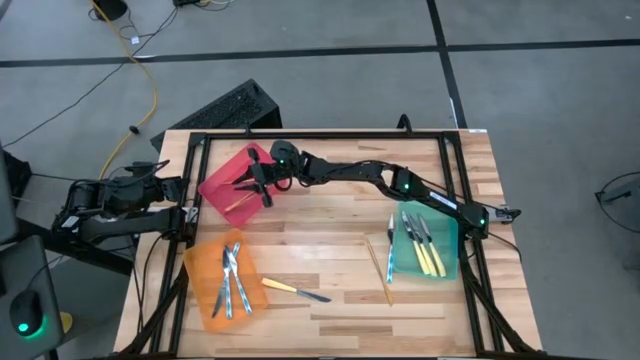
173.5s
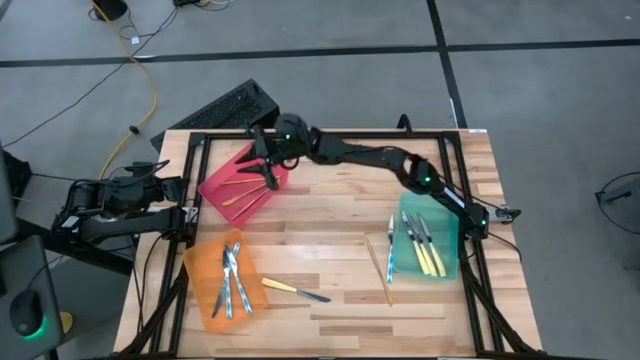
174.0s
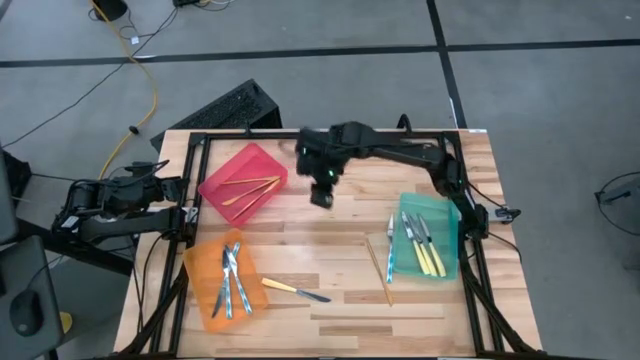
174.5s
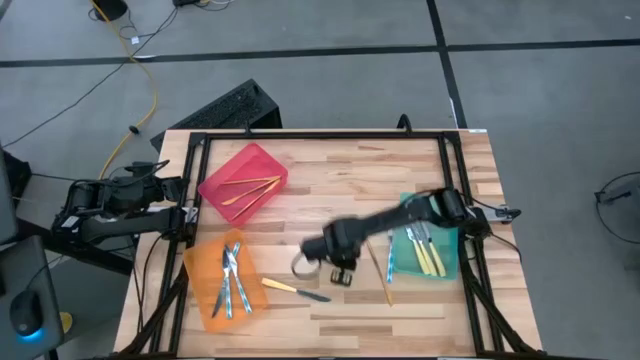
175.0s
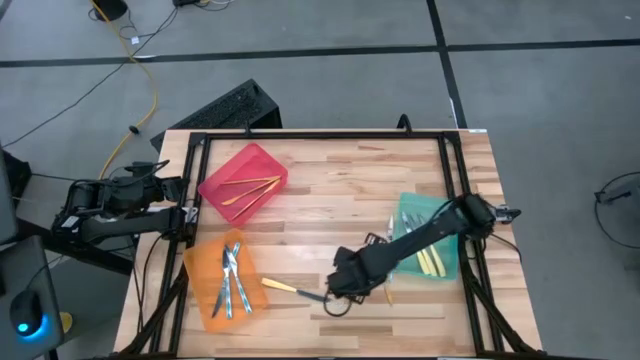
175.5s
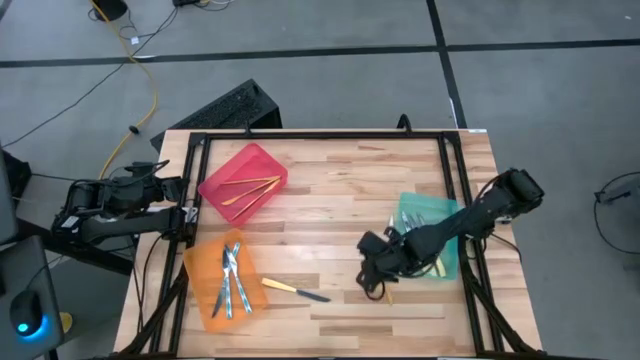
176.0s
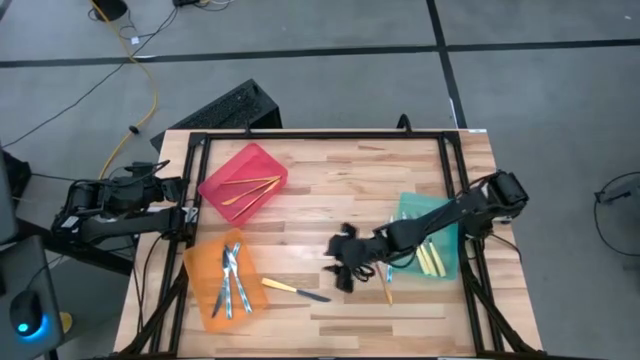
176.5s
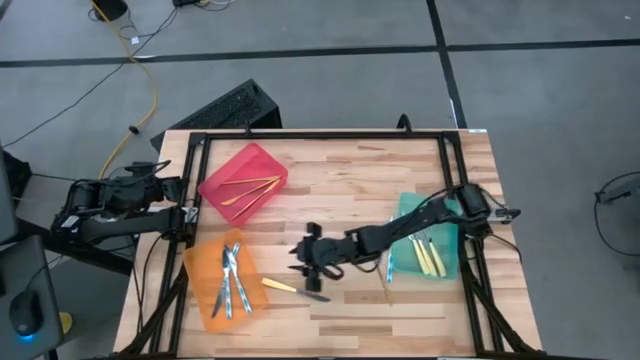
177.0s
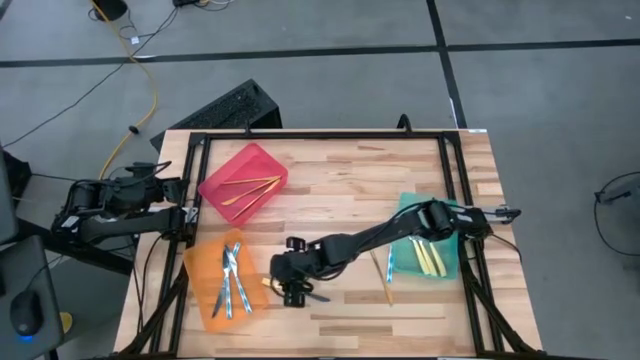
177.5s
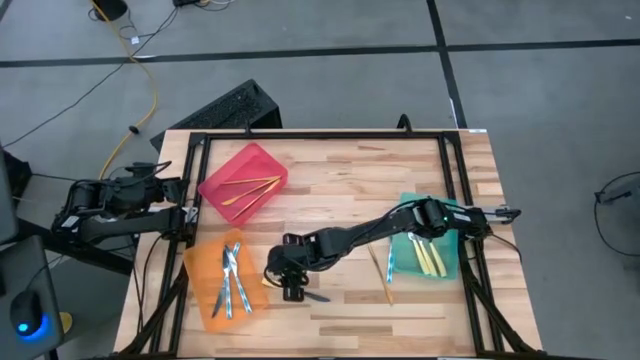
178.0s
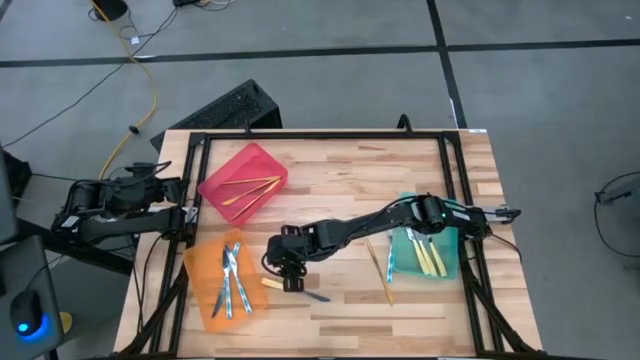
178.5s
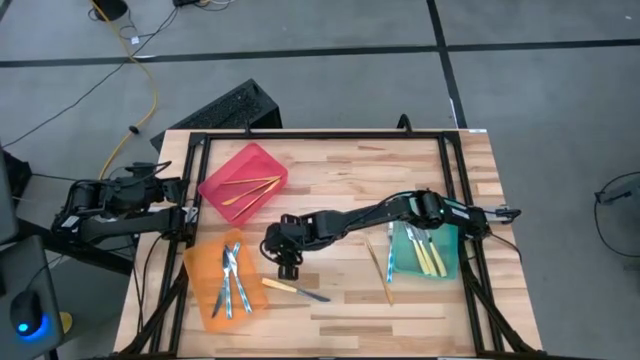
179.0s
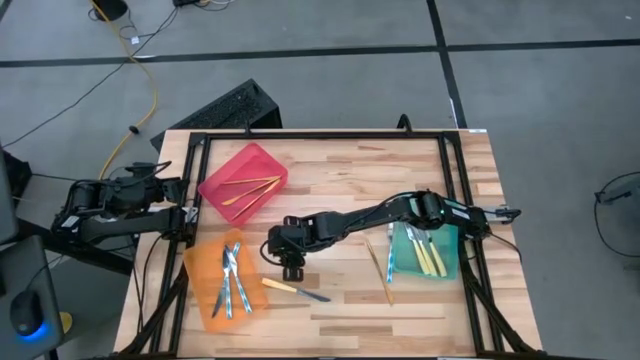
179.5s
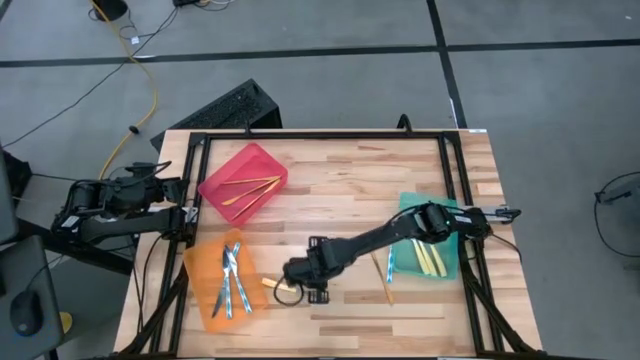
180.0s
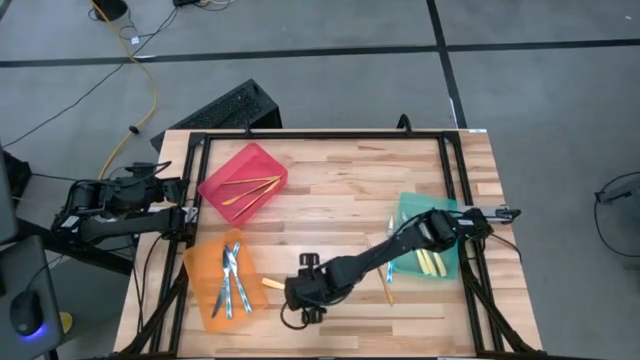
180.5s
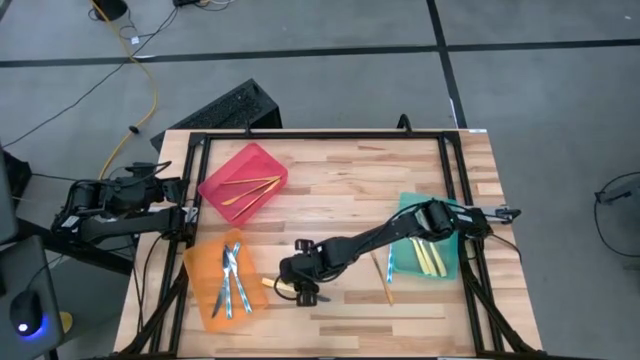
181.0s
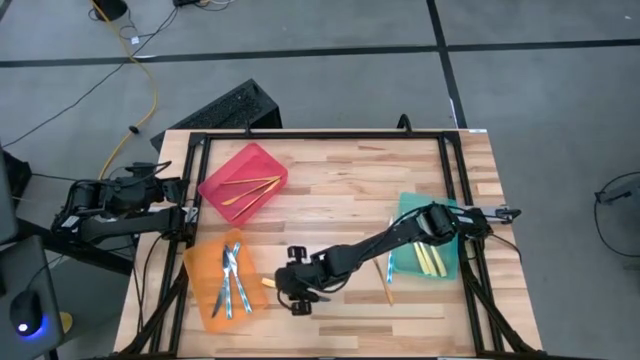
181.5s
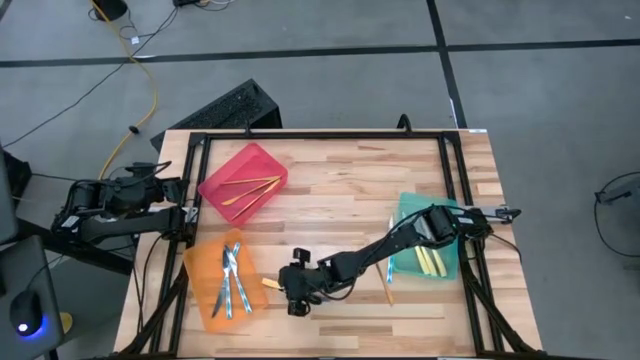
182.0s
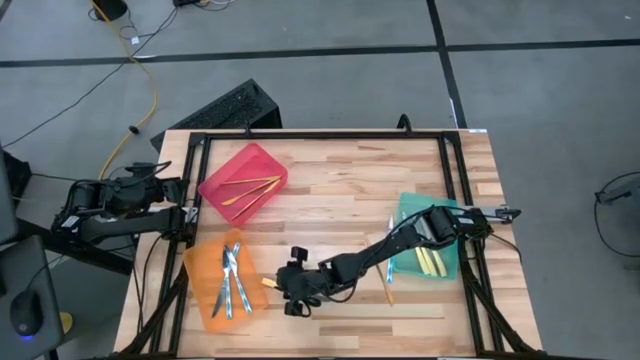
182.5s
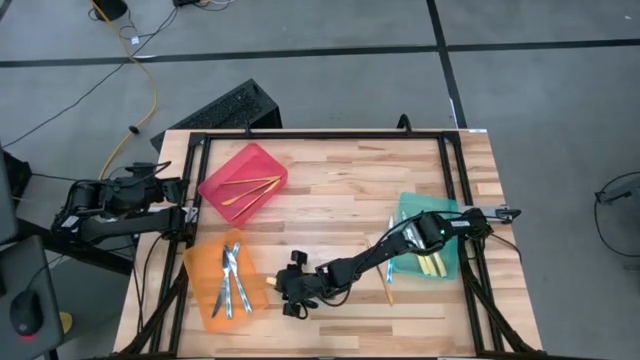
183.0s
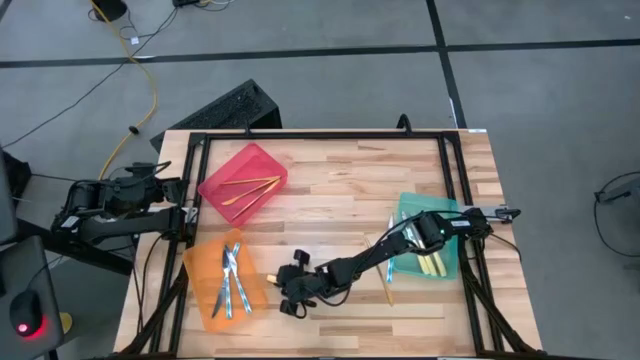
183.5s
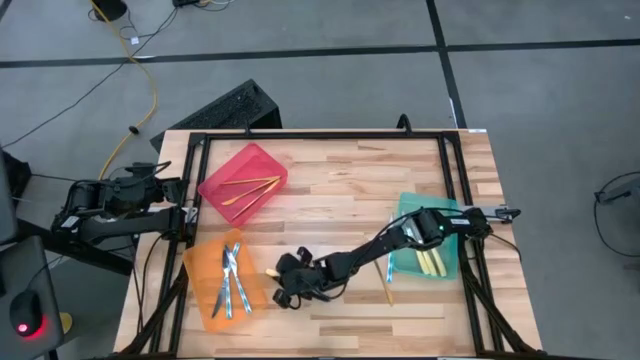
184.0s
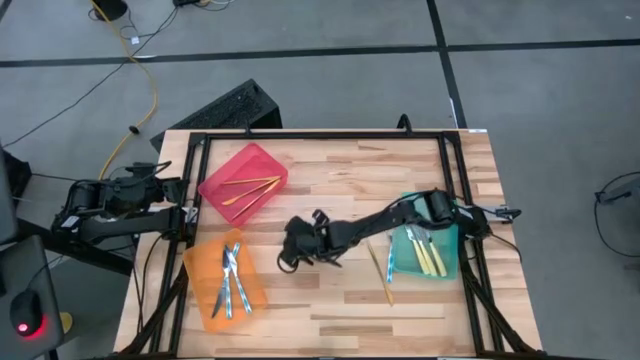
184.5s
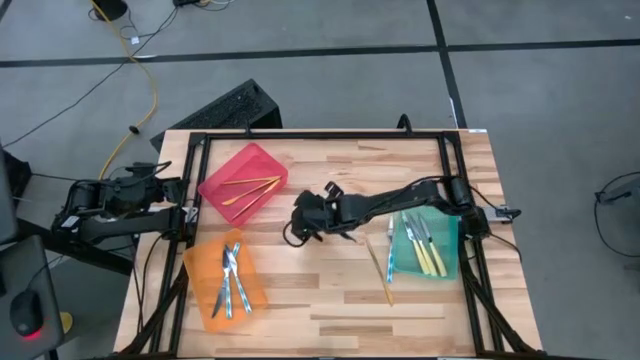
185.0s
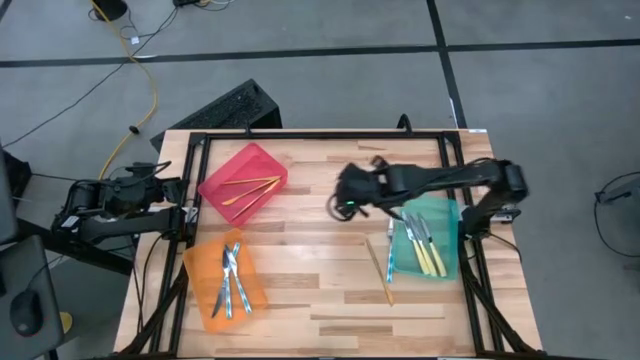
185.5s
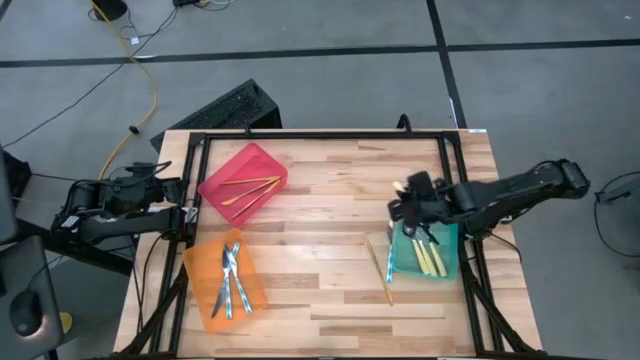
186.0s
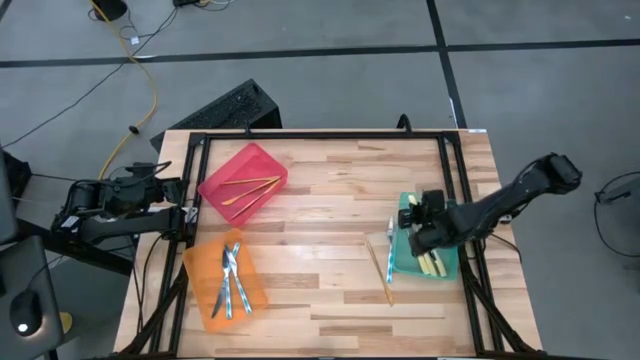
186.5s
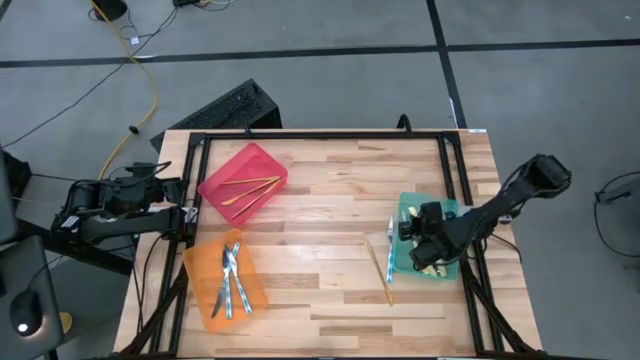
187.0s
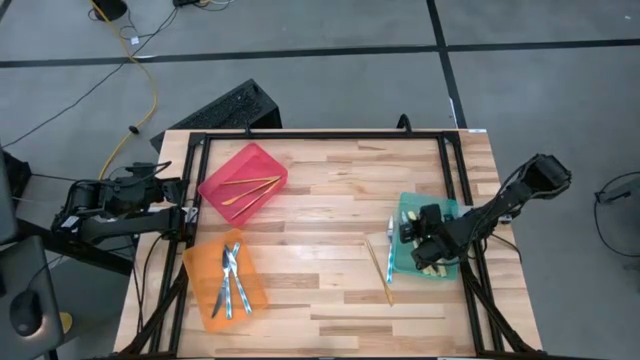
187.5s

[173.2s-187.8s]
Task: Sort silverware by color (type)
Put the yellow knife into the green bin

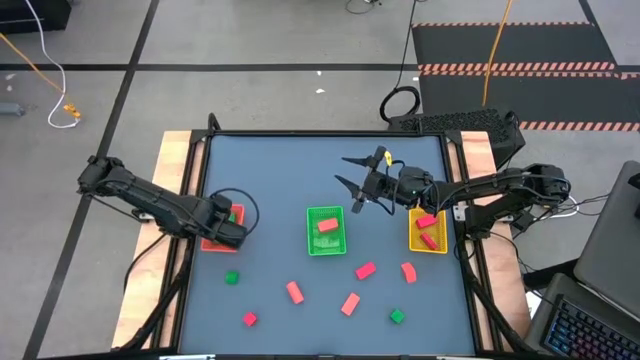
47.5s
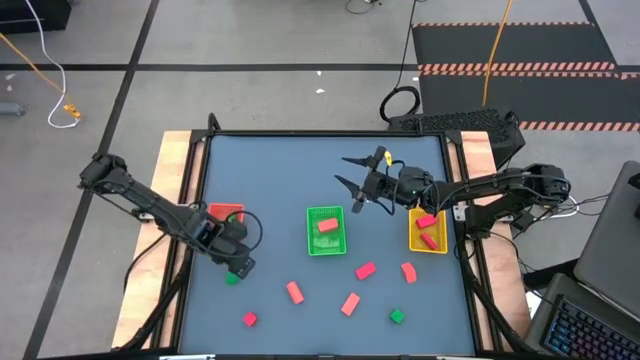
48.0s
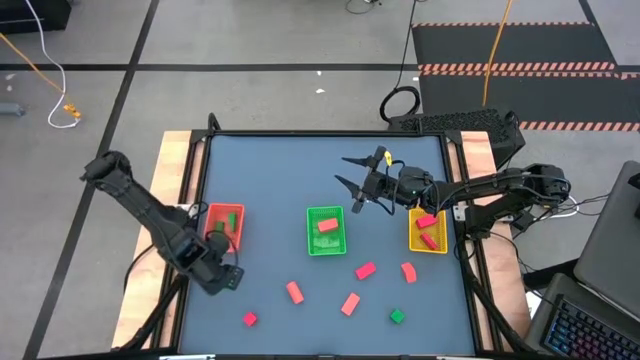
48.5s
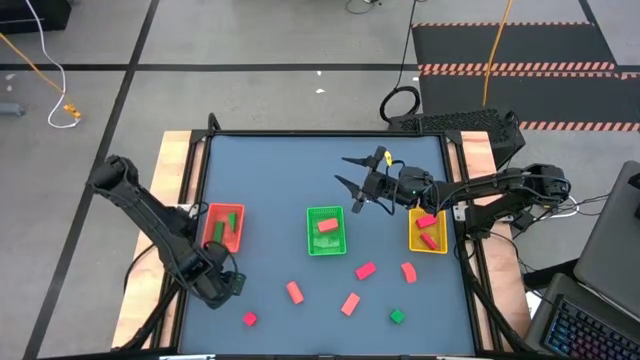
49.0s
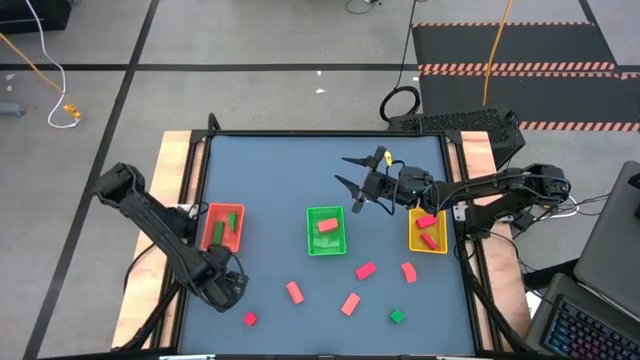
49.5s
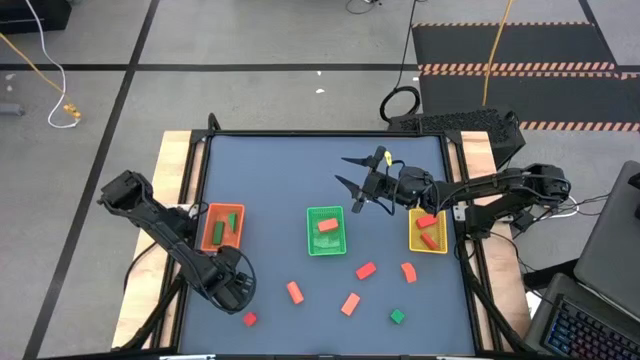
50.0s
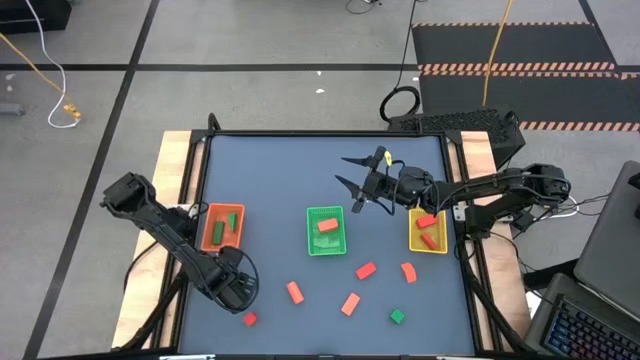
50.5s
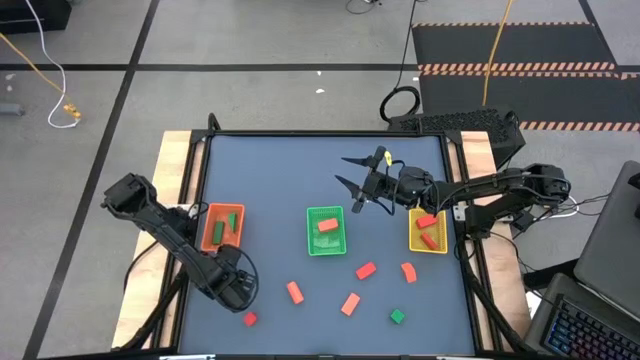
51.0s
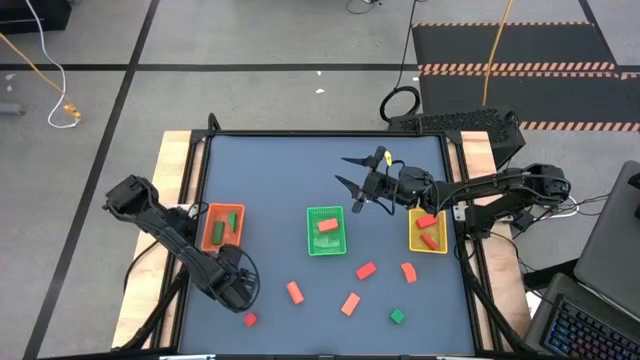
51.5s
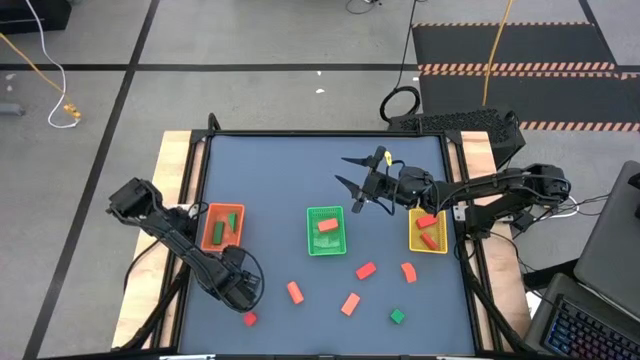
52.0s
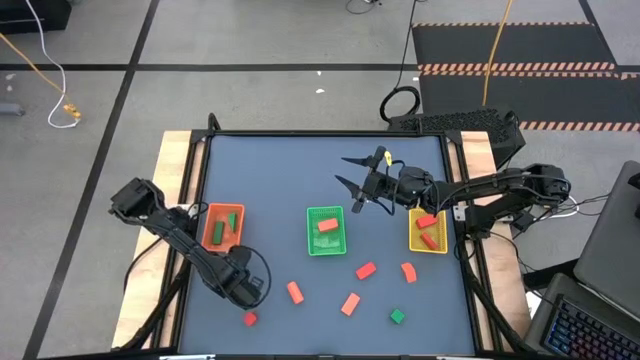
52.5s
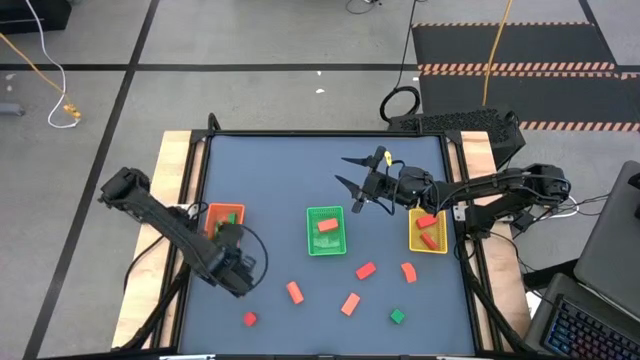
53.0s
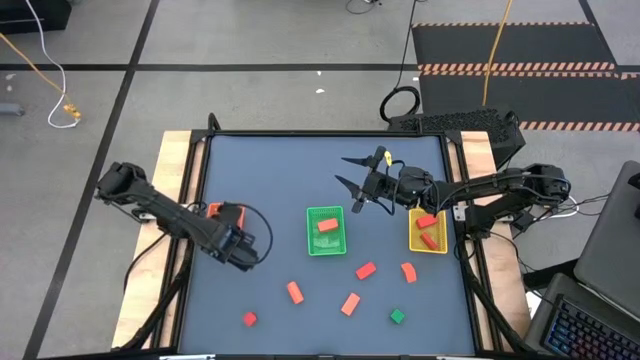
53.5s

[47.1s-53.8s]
Task: Sort & place blocks by color
Put the green block into the orange bin

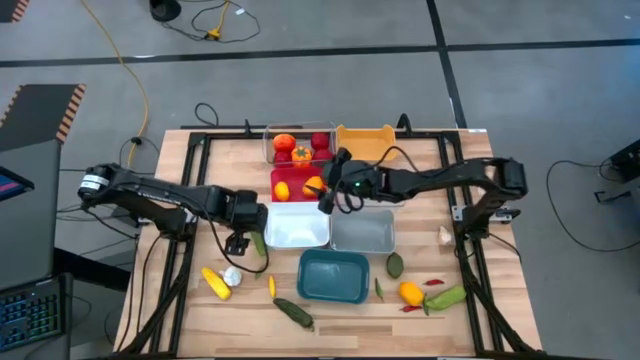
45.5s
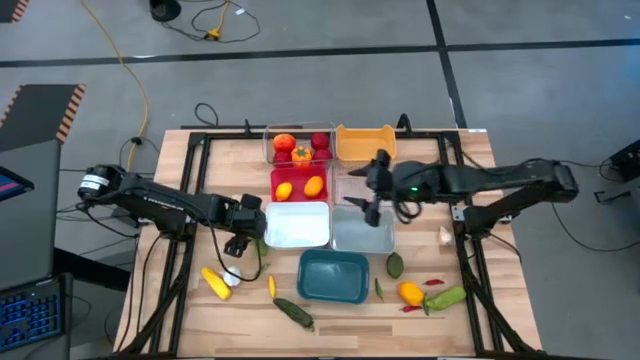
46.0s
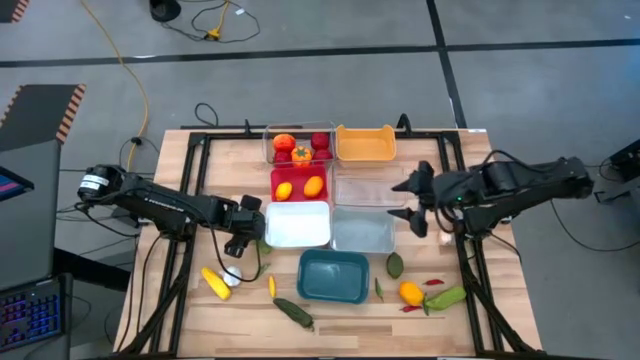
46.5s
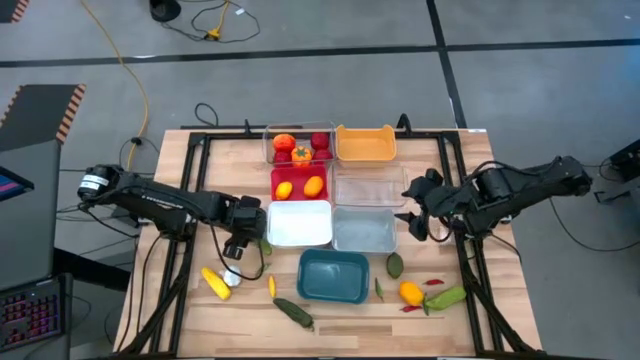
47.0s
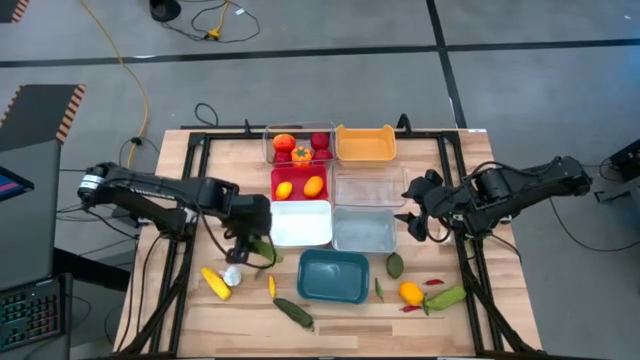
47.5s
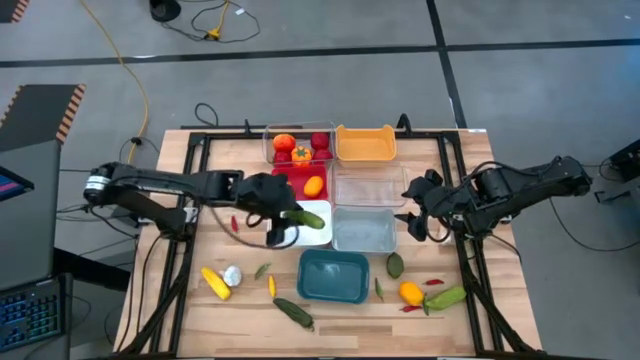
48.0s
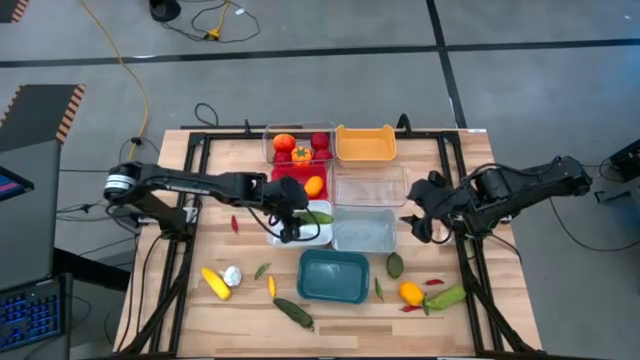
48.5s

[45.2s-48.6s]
Task: Sort produce into baskets
Put the left green cucumber into the white bin
